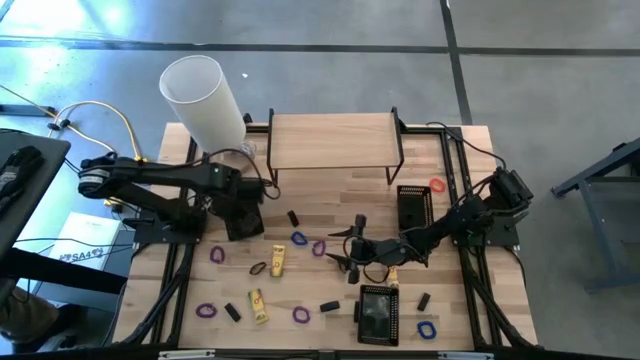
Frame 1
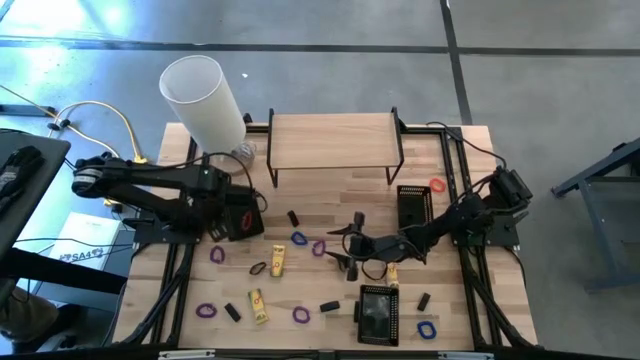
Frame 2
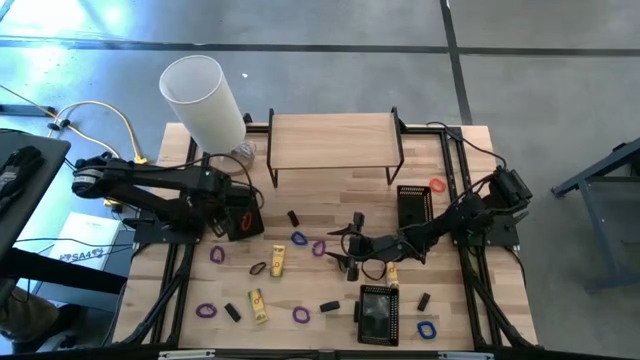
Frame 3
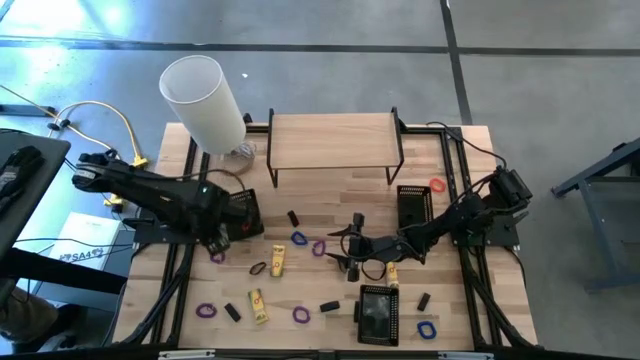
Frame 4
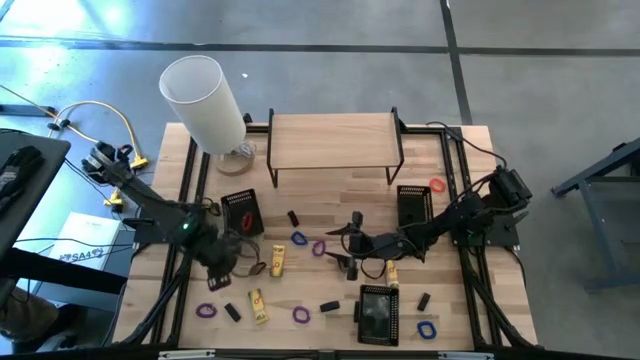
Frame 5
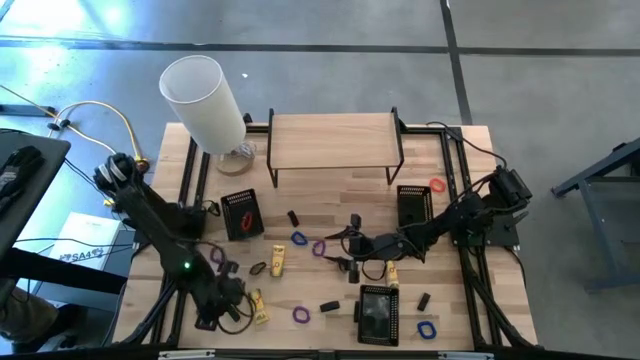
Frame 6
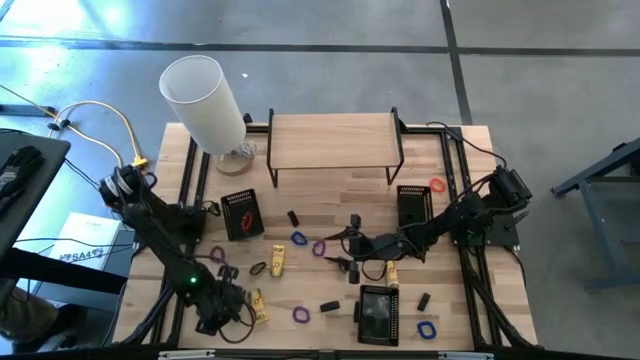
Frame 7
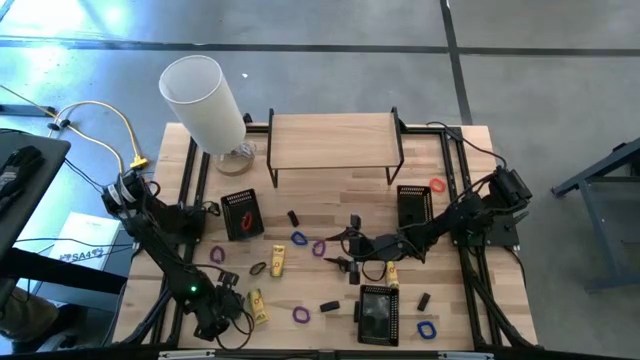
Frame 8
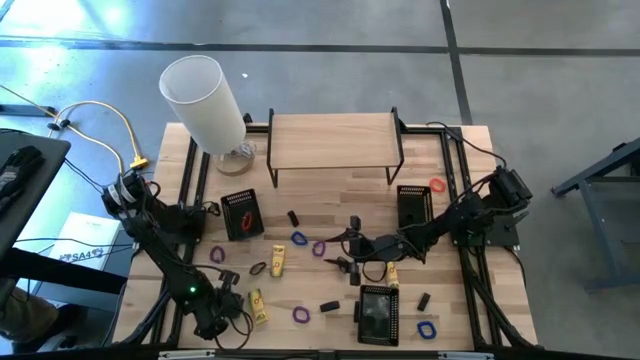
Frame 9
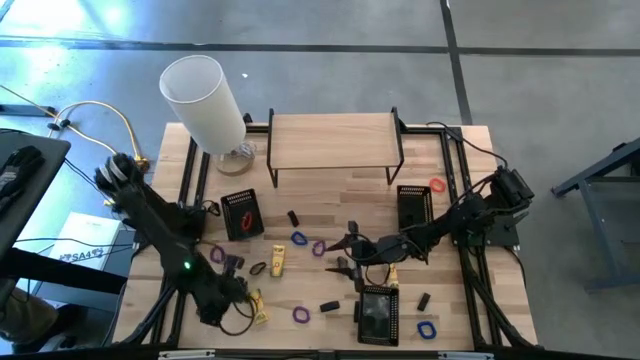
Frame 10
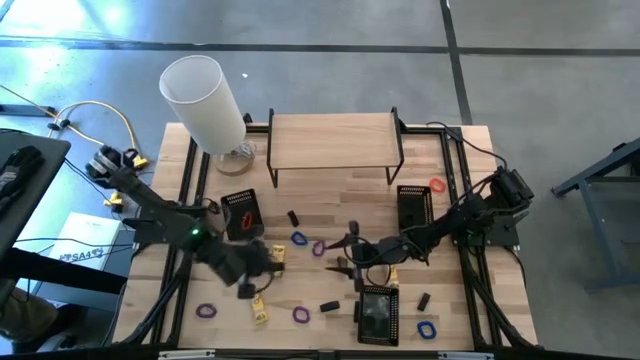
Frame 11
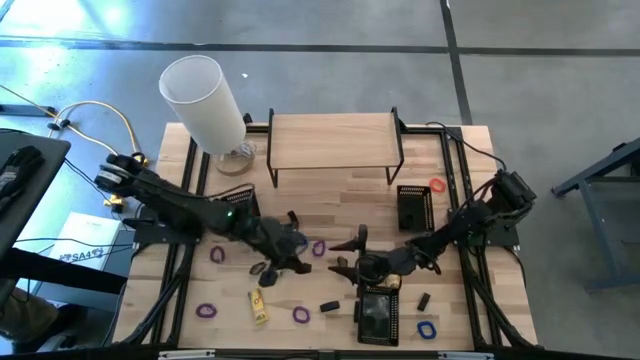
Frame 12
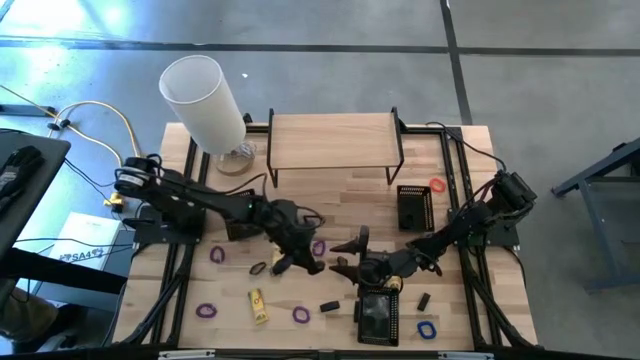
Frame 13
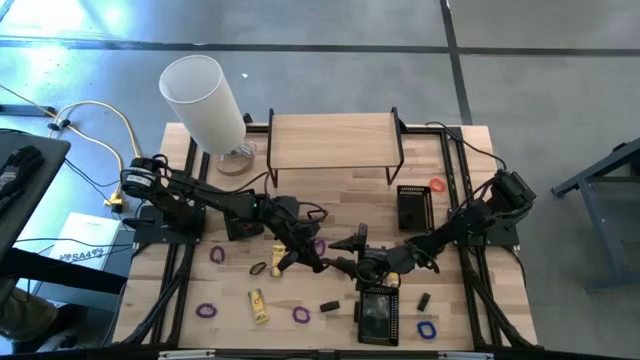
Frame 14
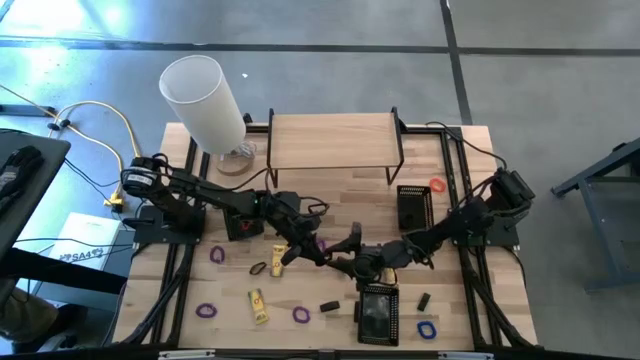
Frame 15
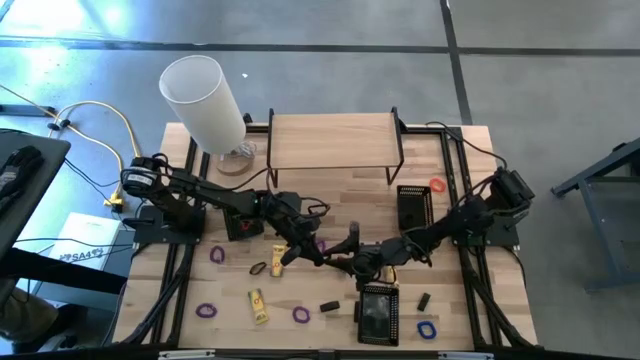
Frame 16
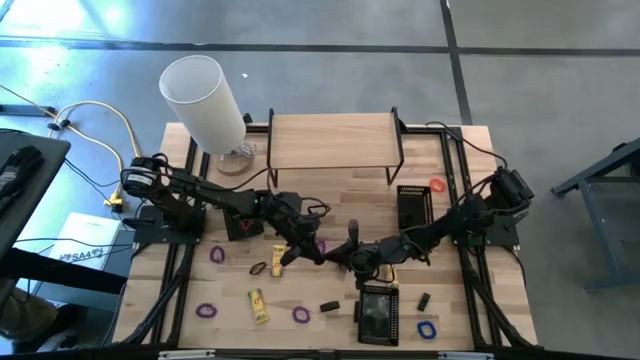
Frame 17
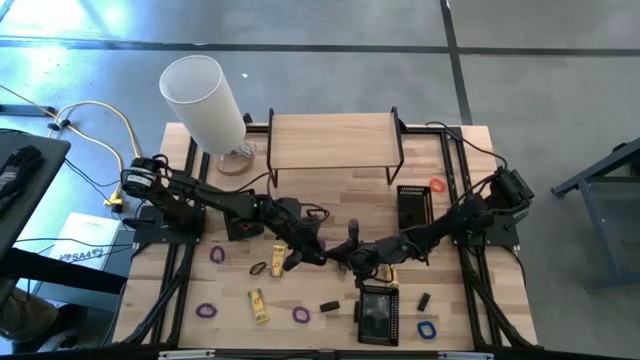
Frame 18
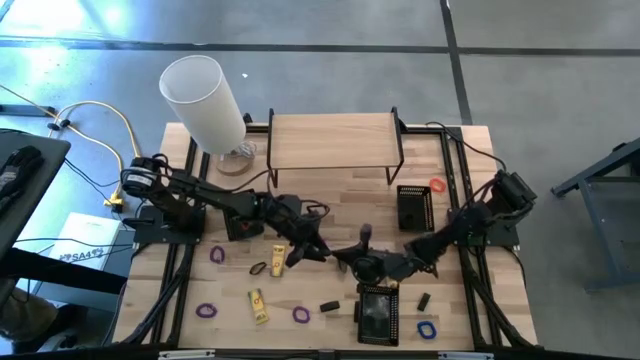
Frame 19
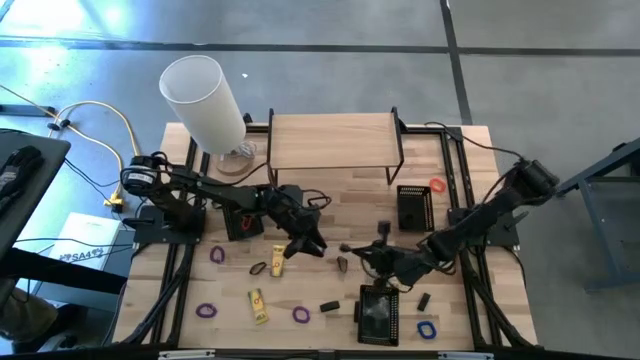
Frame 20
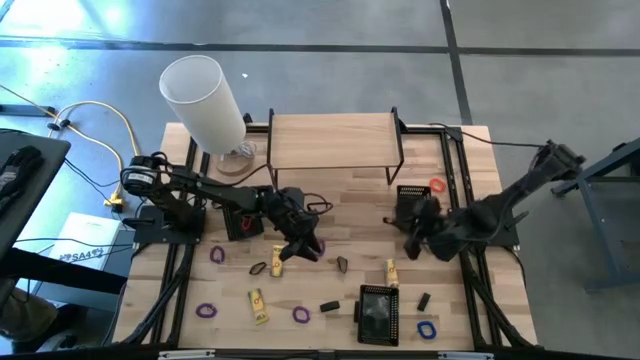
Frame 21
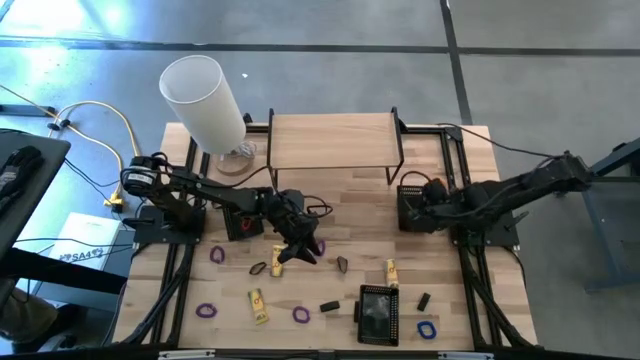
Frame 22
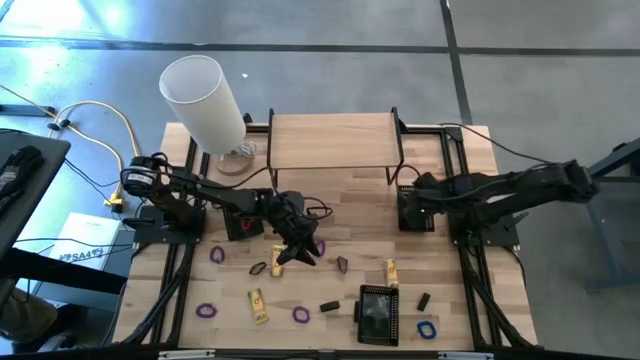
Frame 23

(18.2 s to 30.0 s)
Task: Pick & Place Office Desk Supplies
Put the rubber band into the top right bin

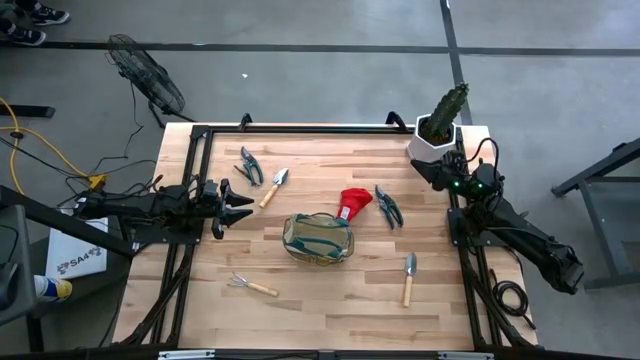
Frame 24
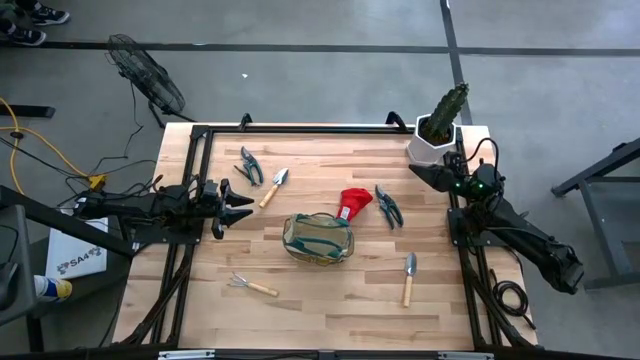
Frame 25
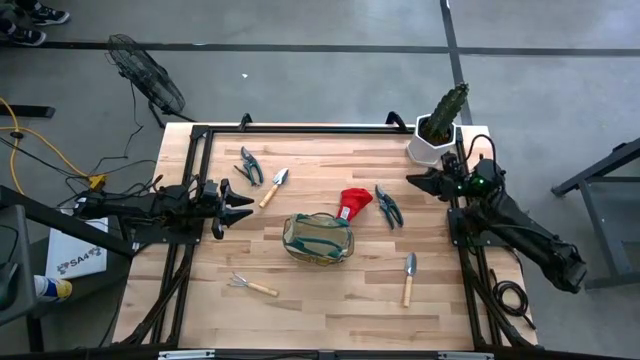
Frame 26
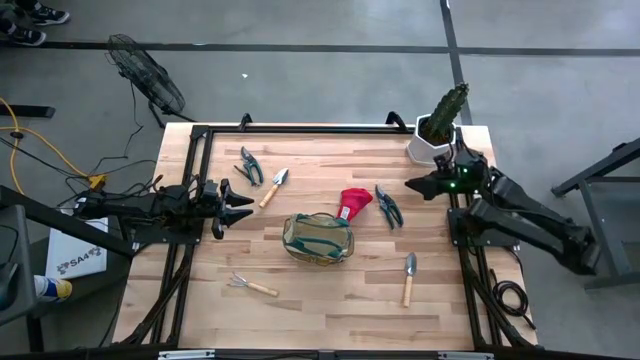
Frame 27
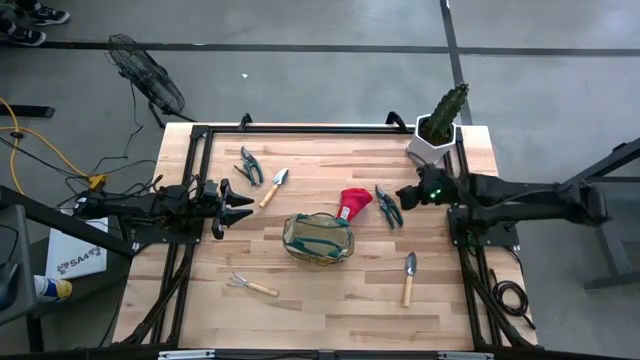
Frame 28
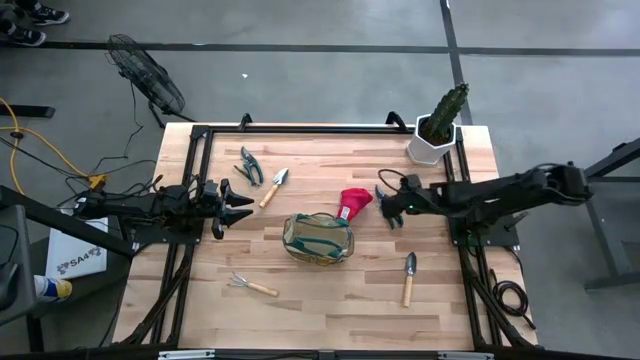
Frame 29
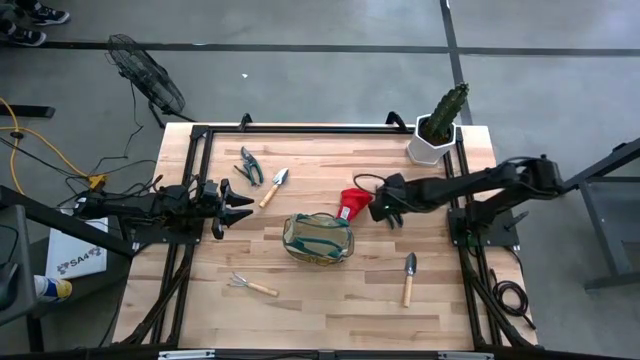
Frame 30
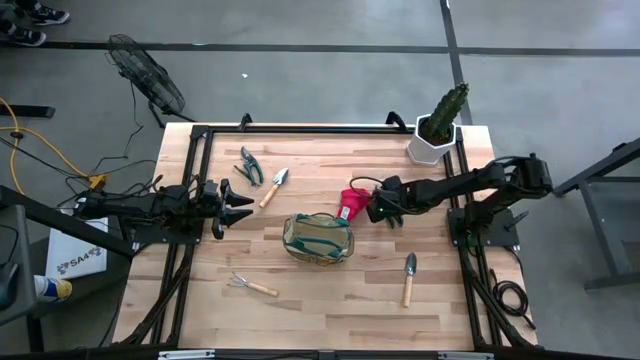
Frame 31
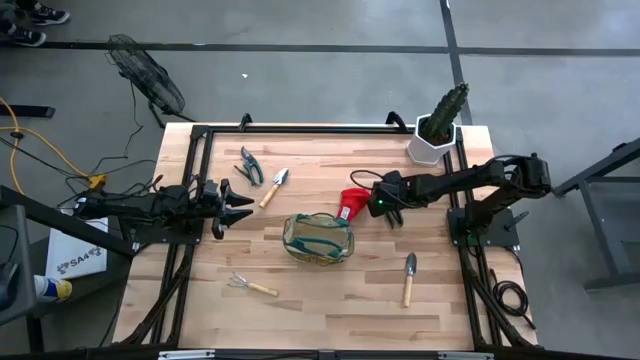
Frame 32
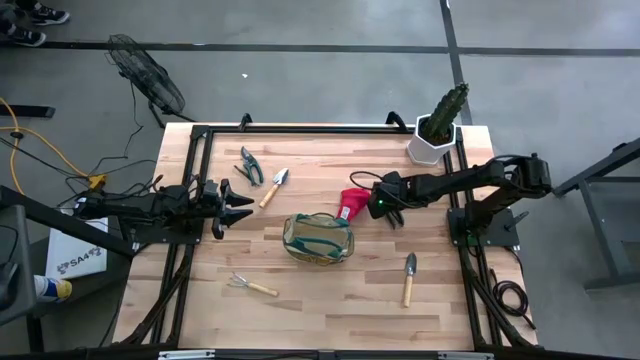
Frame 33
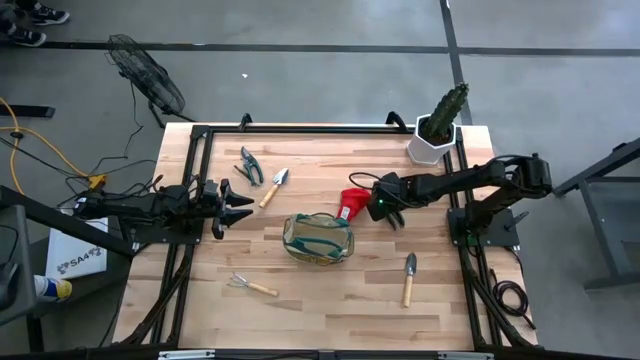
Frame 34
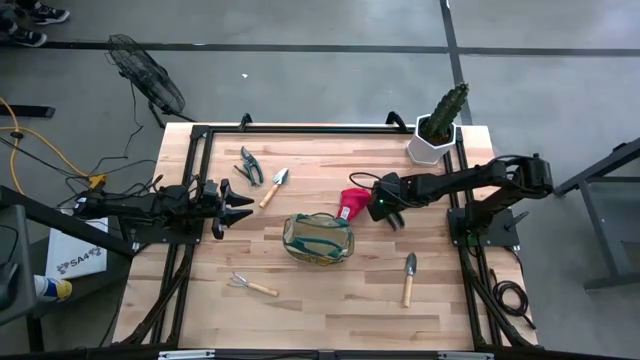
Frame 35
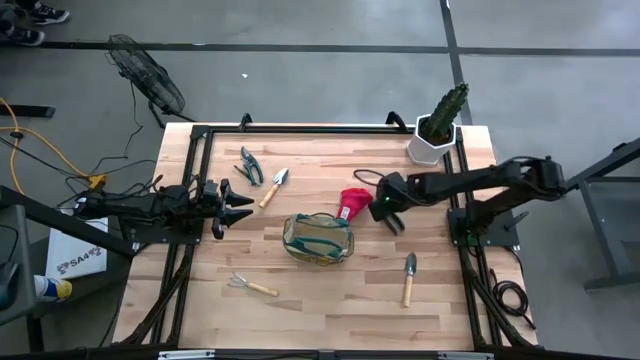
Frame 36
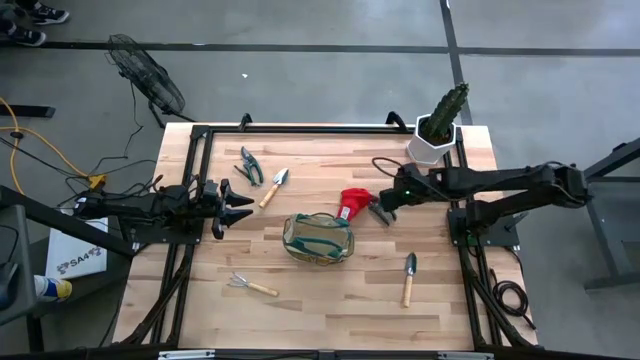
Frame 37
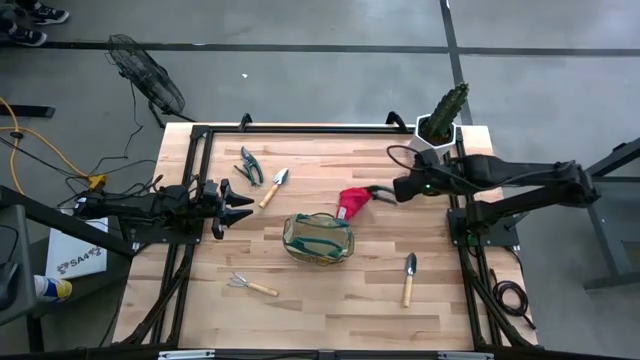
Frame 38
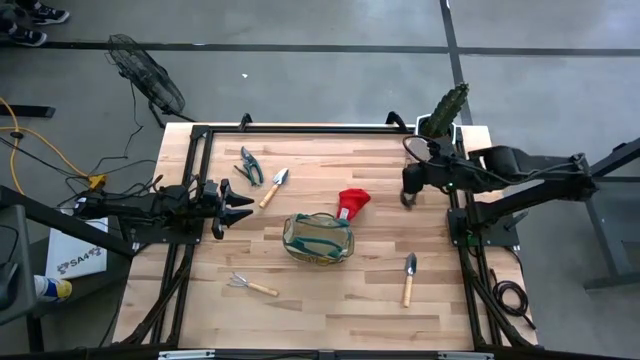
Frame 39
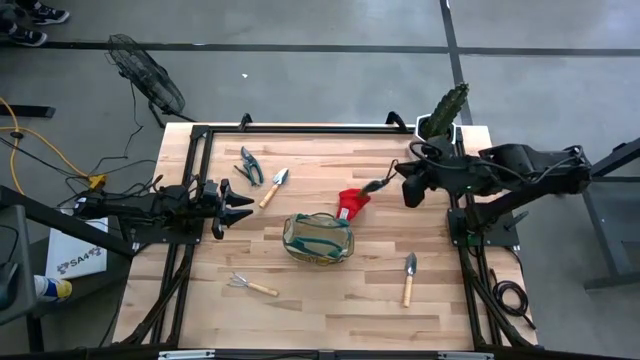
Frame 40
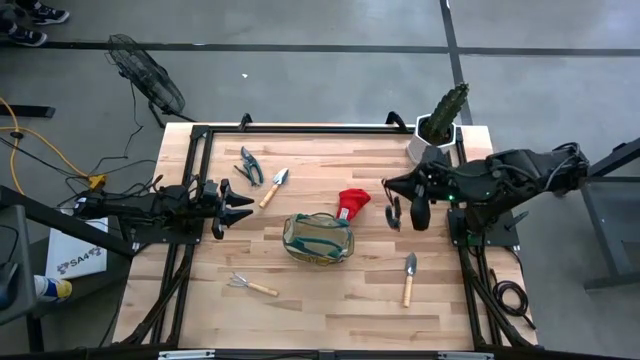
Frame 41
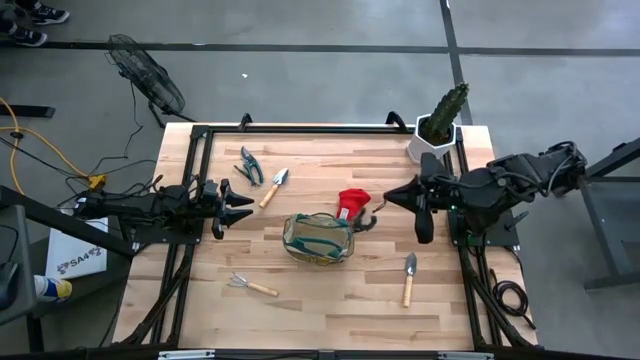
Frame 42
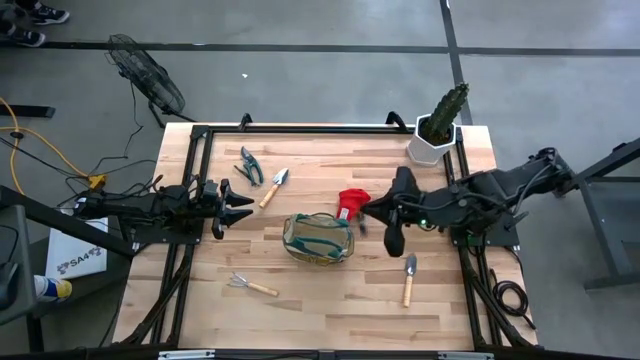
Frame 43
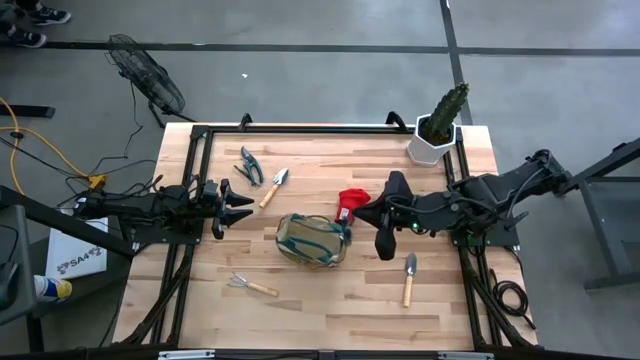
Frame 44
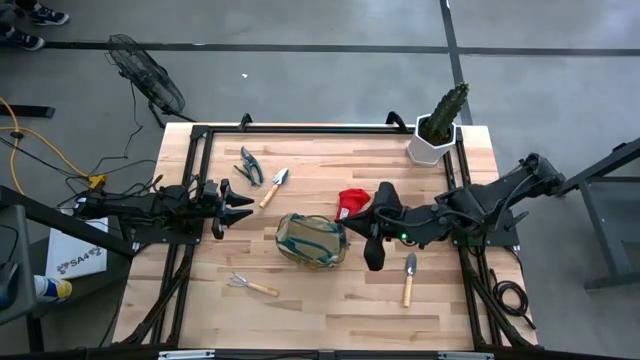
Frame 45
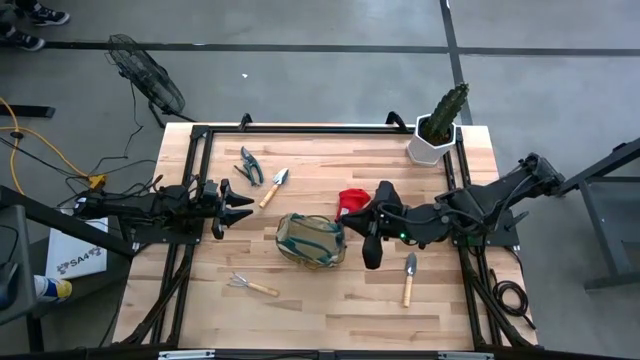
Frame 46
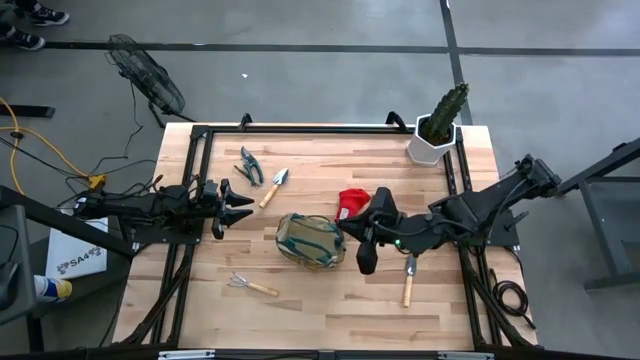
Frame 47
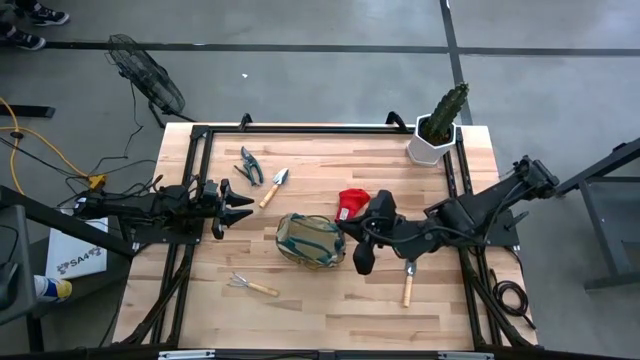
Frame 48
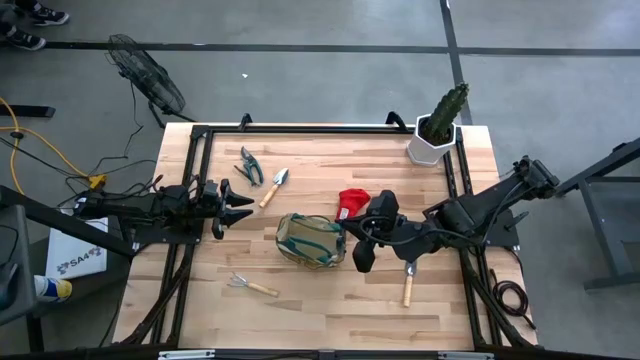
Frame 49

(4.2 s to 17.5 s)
Task: Pick & Place Garden tools in Gardening bag
Put the green right shear scissors into the gardening bag
